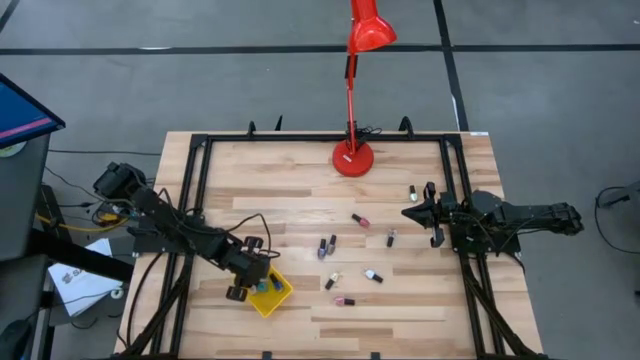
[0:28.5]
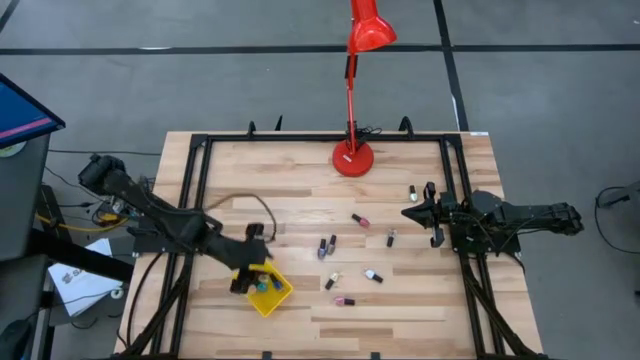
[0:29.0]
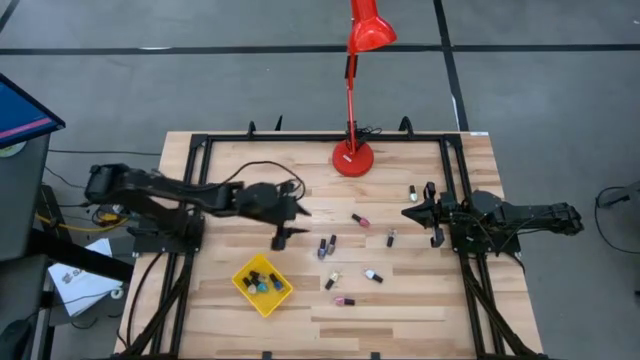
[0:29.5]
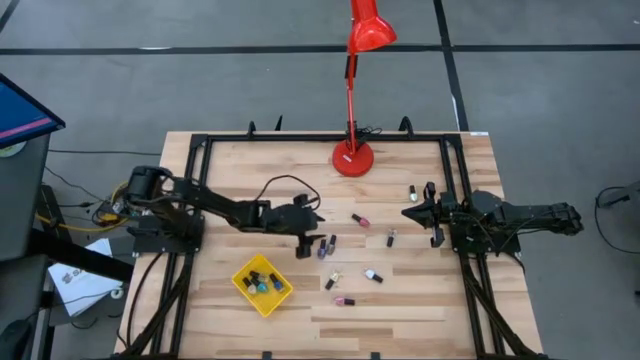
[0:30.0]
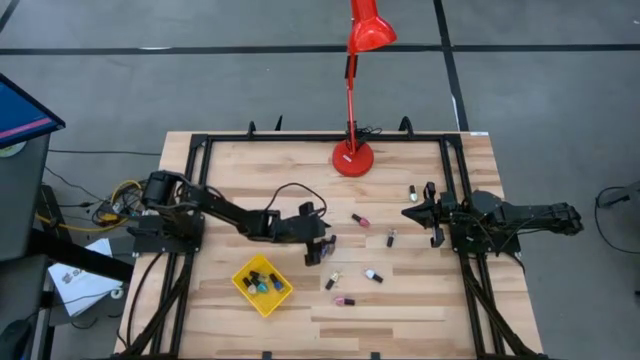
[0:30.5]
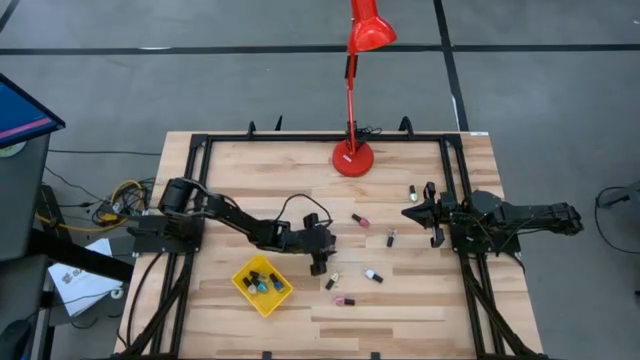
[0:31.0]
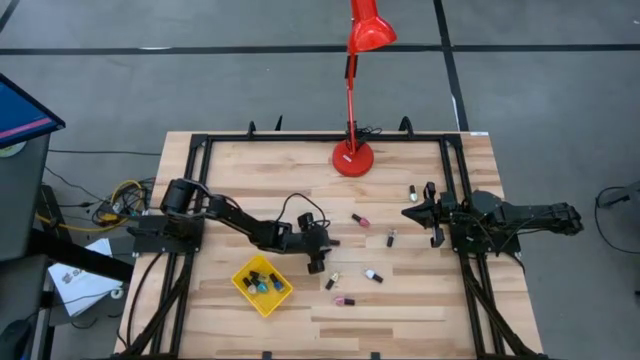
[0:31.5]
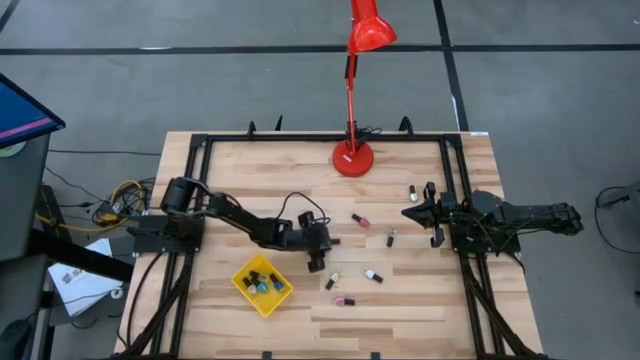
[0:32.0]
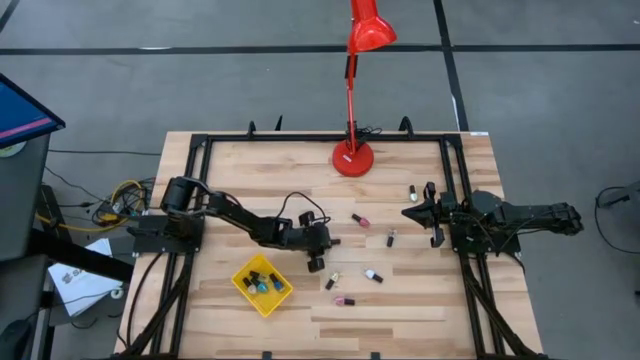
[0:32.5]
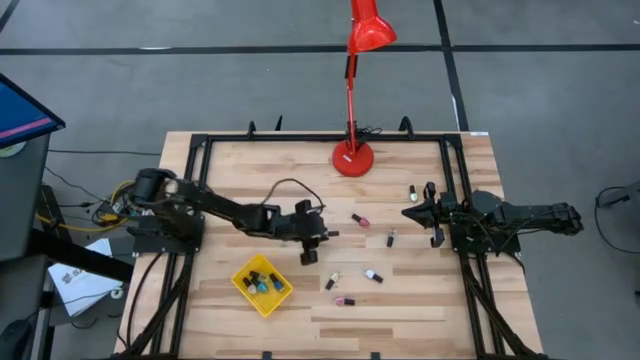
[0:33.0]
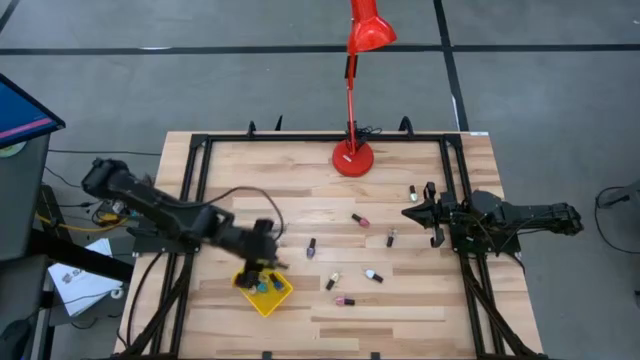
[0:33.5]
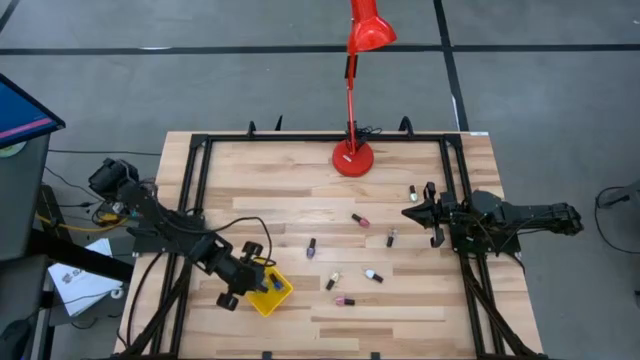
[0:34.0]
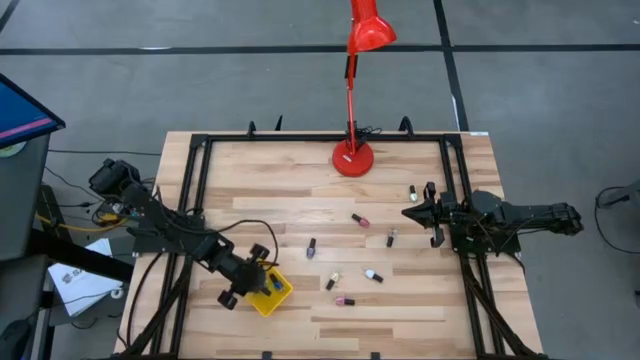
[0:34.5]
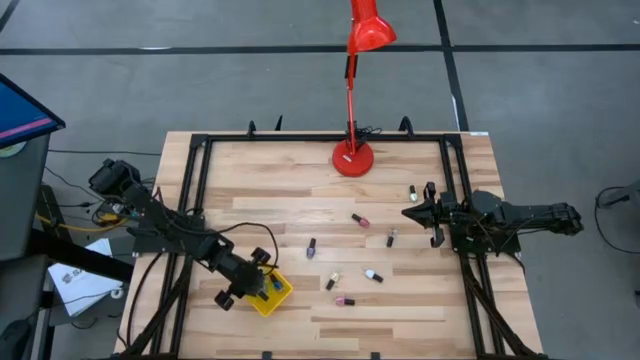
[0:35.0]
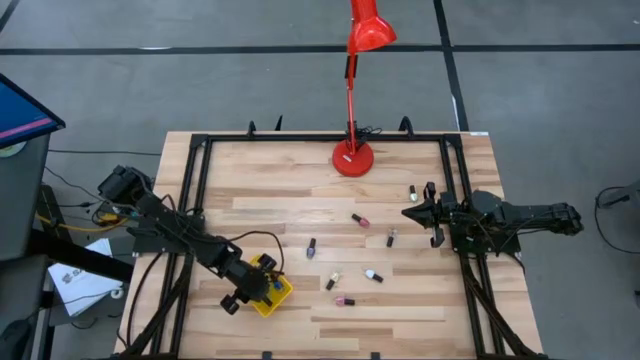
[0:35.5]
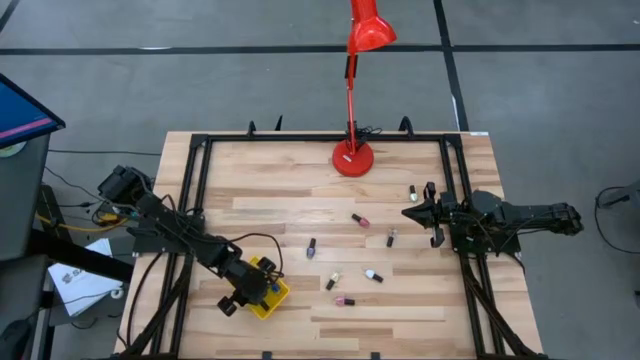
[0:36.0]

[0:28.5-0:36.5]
Task: Pick & Place Nail Polish
Put the dark brown nail polish bottle into the yellow basket

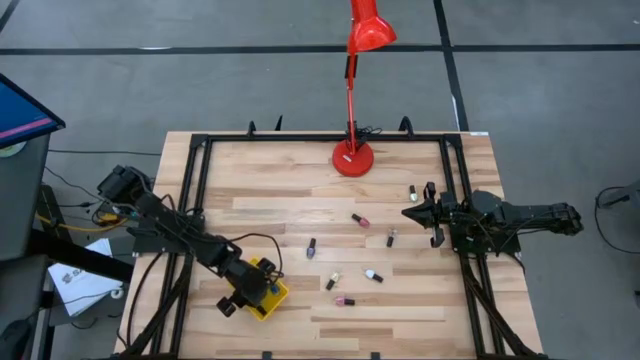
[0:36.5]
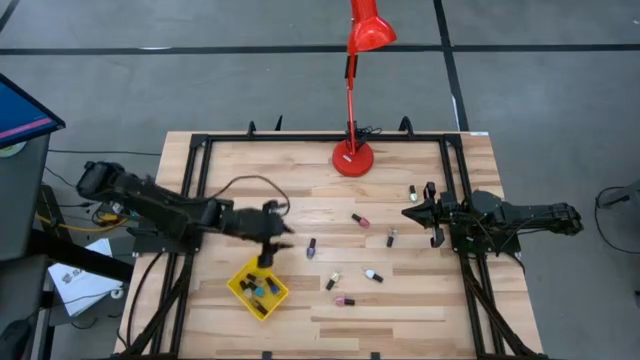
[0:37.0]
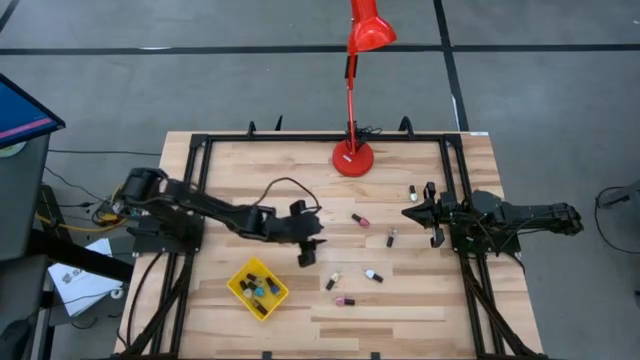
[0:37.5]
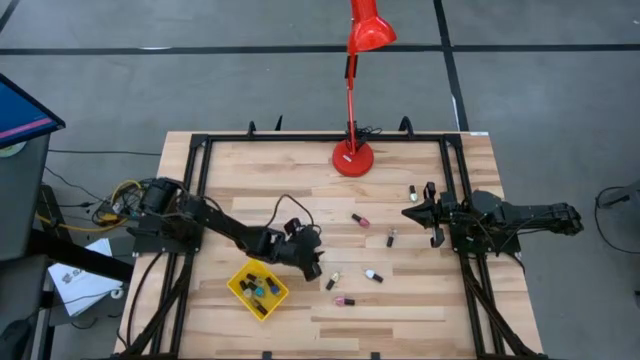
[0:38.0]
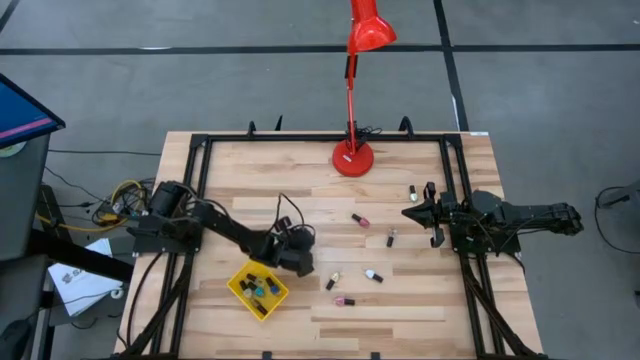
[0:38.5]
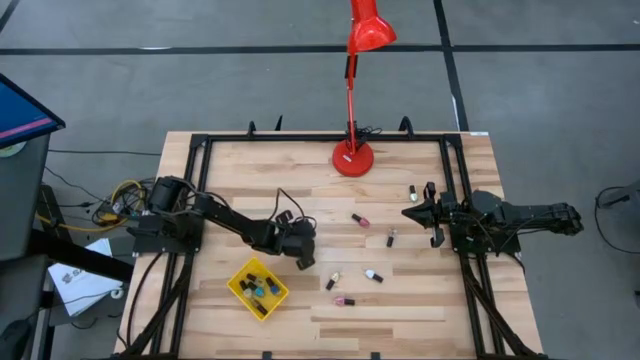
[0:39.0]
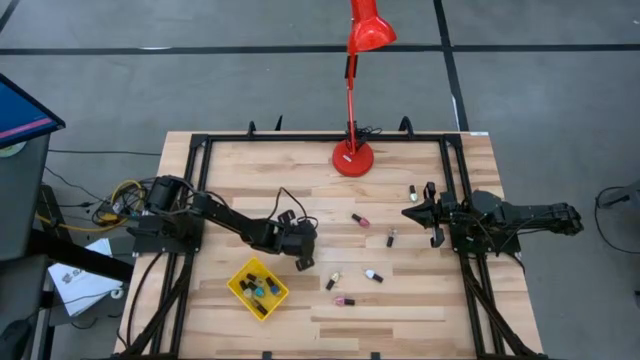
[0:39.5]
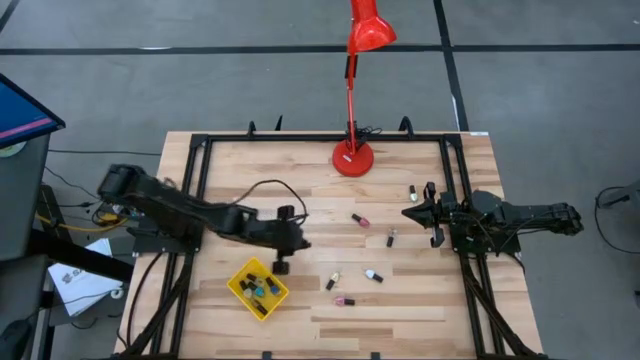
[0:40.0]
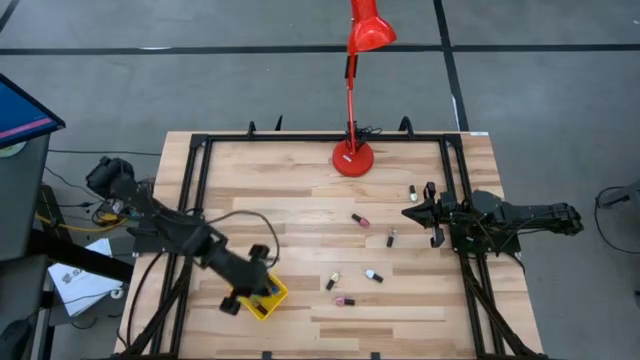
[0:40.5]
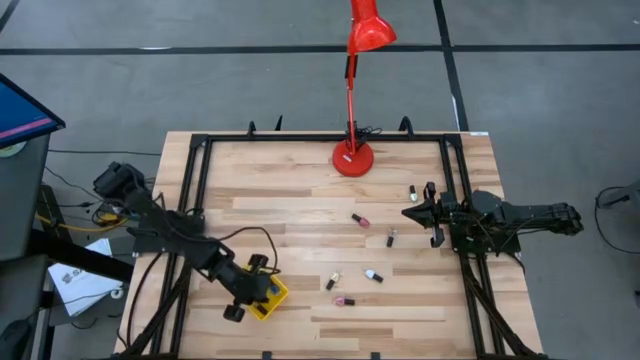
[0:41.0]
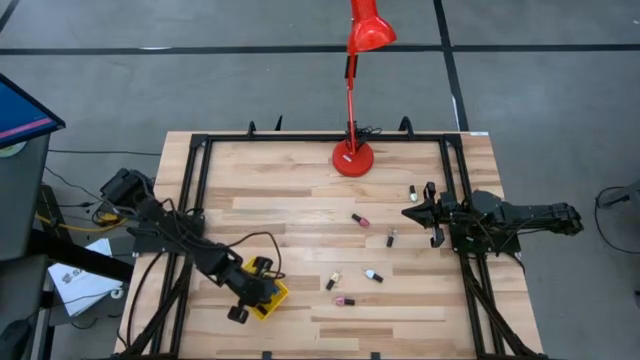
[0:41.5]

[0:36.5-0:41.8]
Put the violet nail polish bottle into the yellow basket

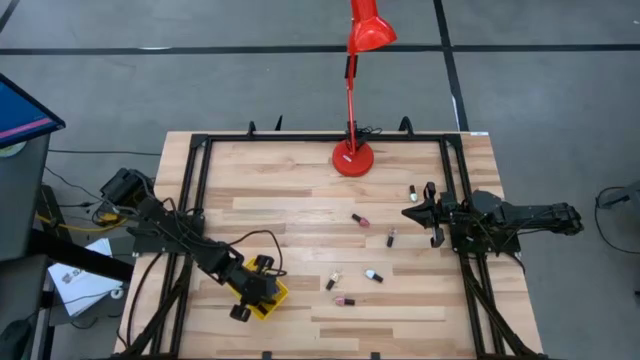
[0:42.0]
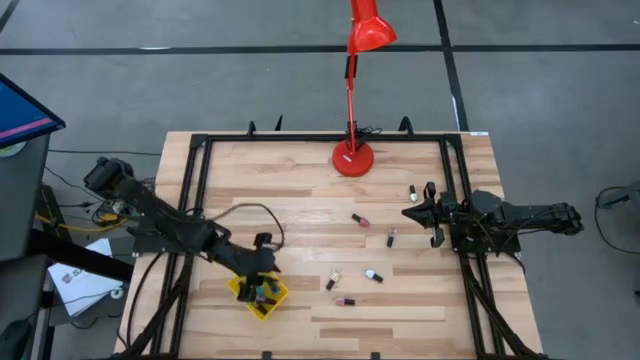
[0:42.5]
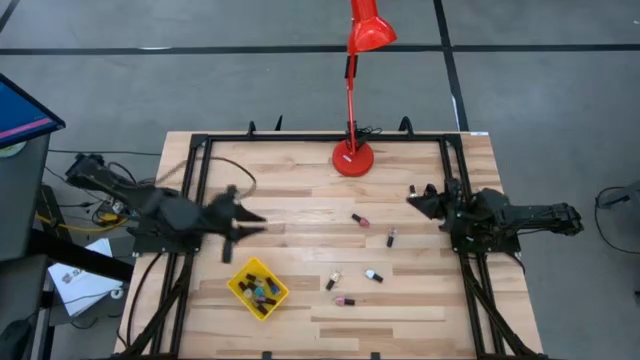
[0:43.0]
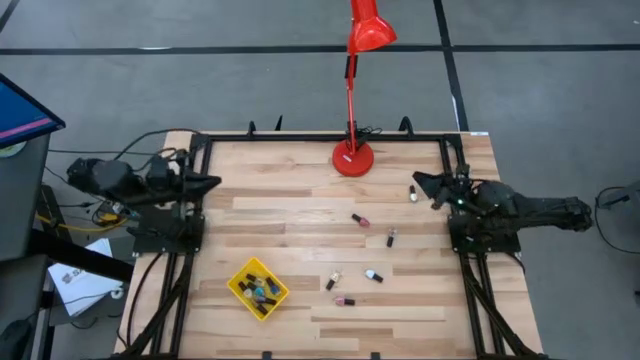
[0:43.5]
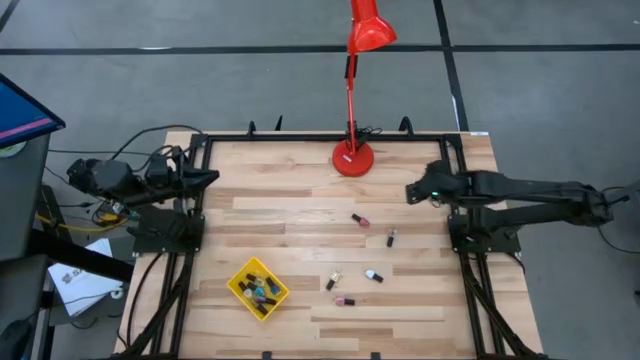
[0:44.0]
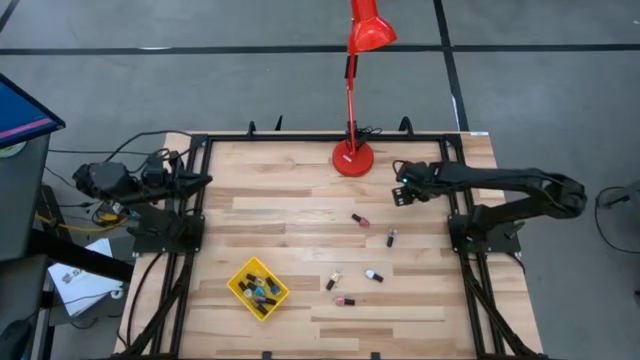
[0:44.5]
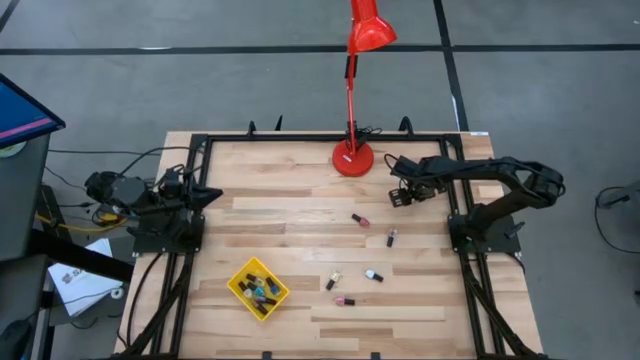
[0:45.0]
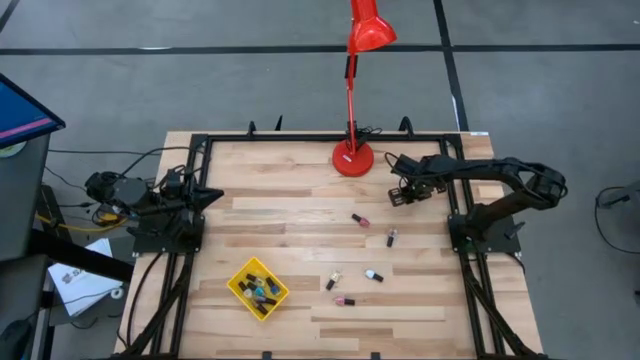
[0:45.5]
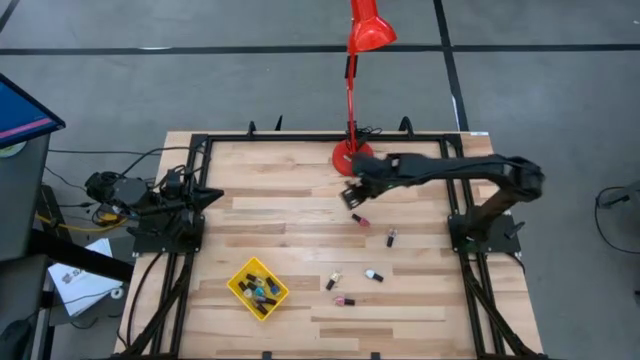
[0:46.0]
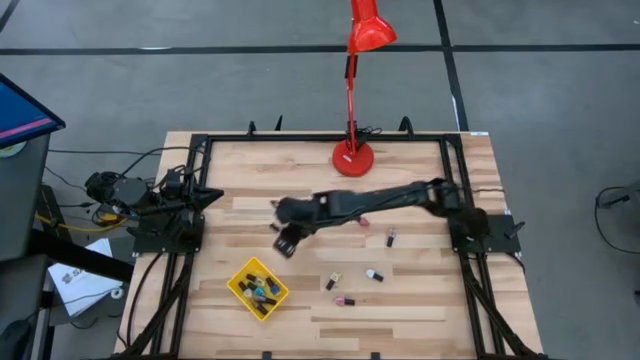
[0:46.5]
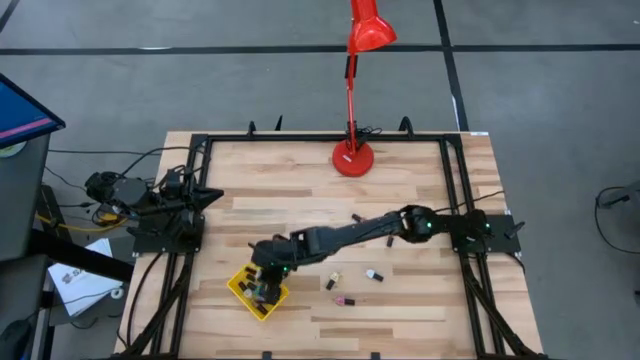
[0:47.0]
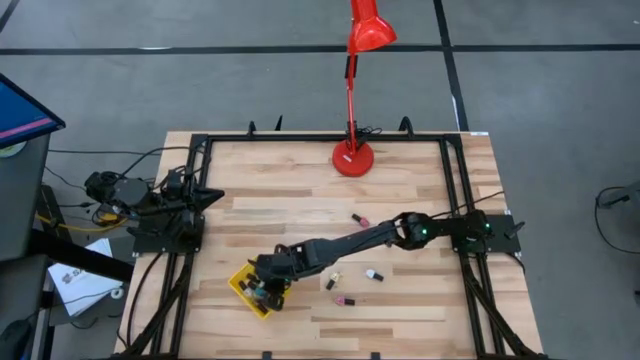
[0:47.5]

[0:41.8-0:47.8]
Put the light green nail polish bottle into the yellow basket

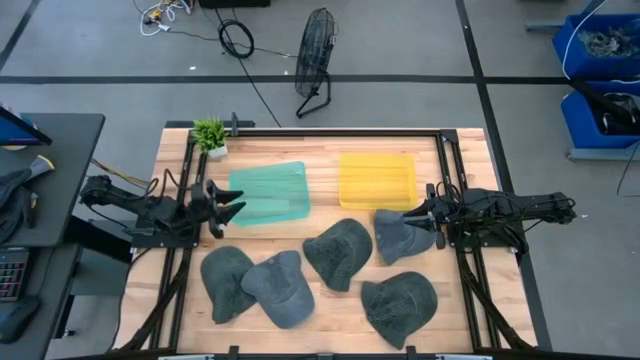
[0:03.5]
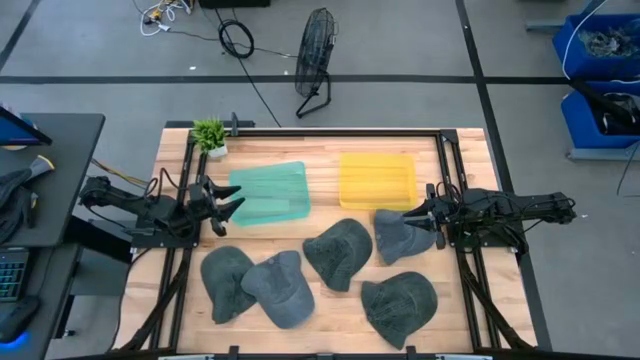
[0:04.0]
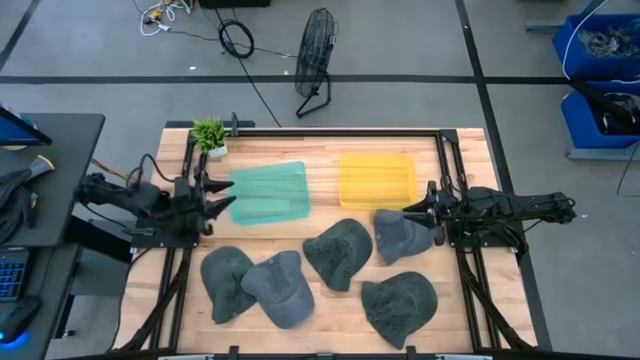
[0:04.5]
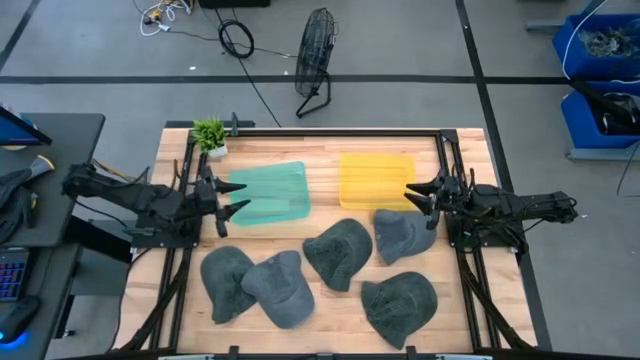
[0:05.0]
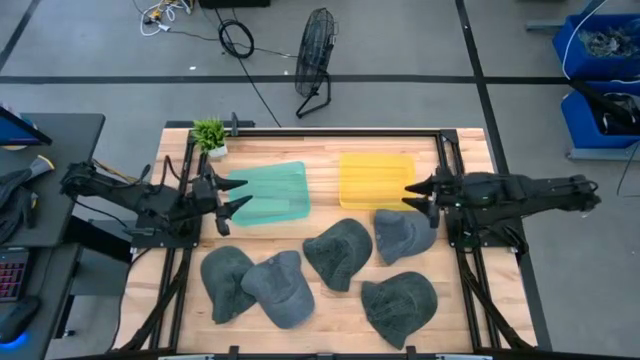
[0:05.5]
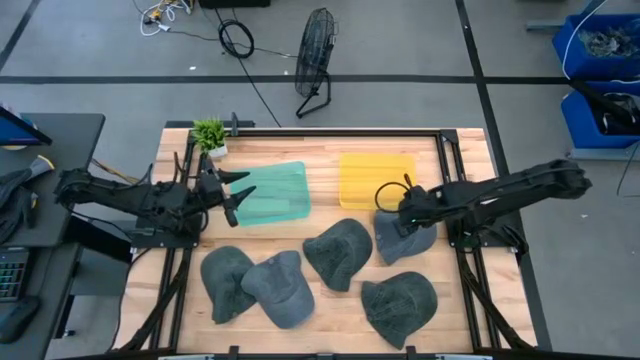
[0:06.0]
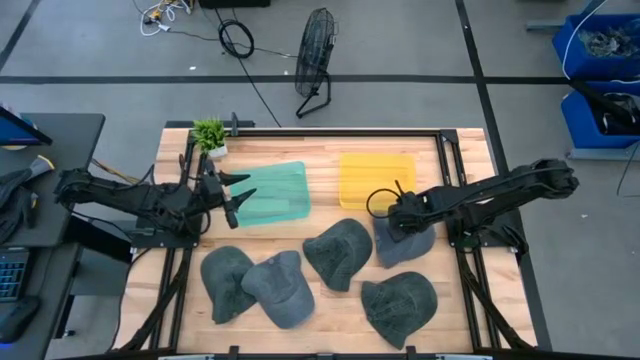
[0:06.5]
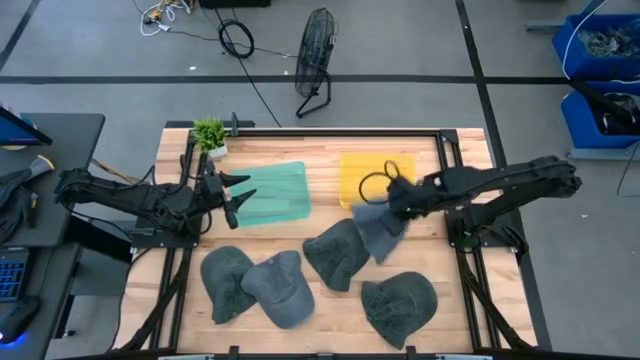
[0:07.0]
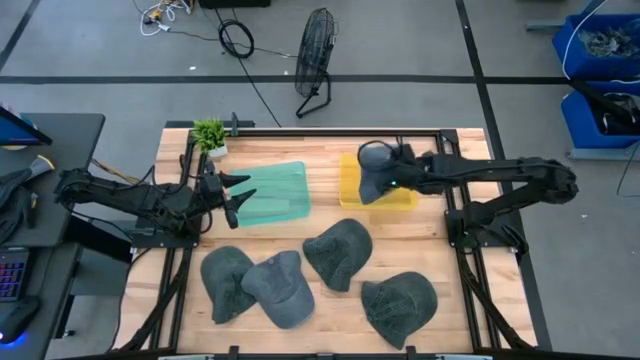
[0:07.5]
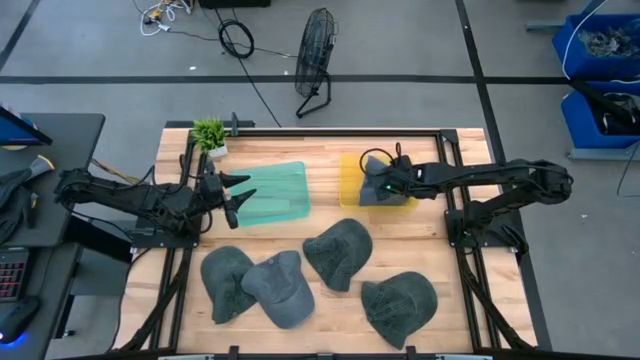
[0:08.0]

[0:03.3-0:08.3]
Task: Pick & Place hat
Put the dark blue cap into the yellow bin
